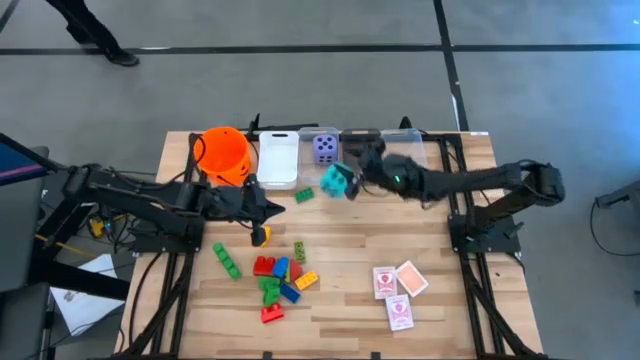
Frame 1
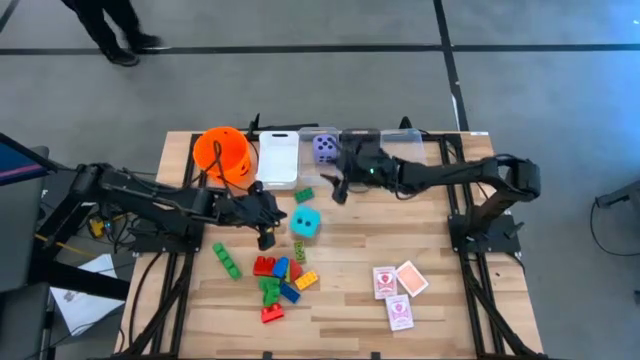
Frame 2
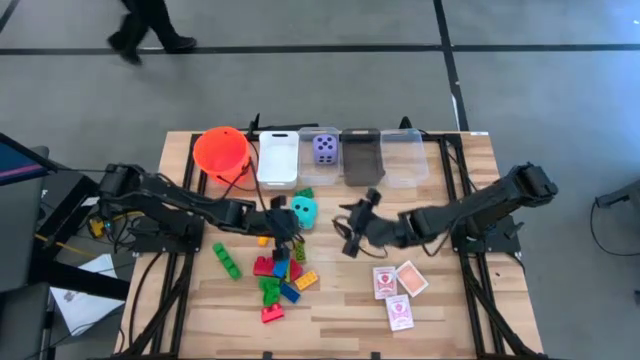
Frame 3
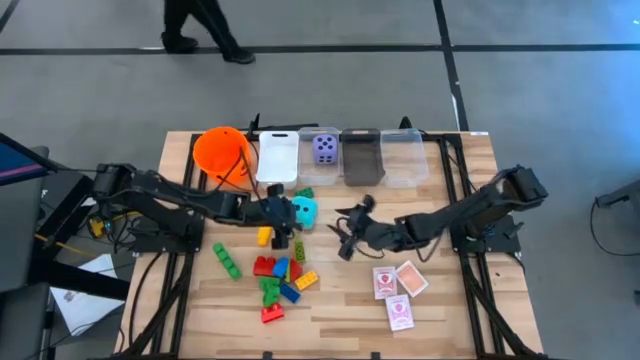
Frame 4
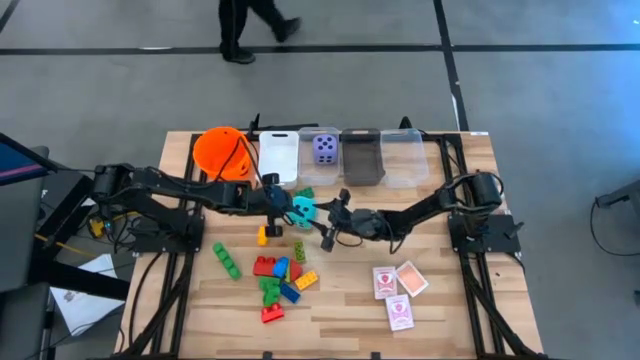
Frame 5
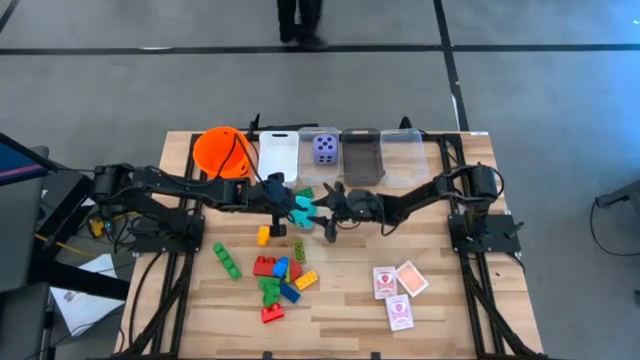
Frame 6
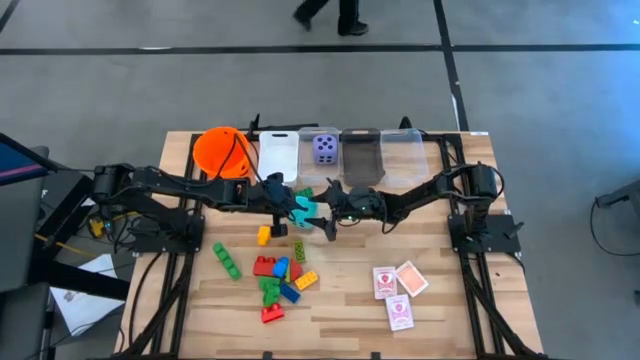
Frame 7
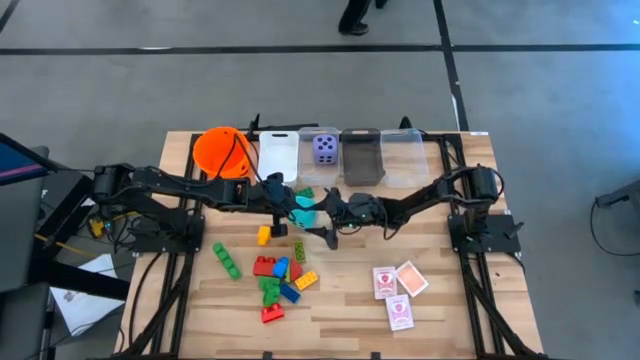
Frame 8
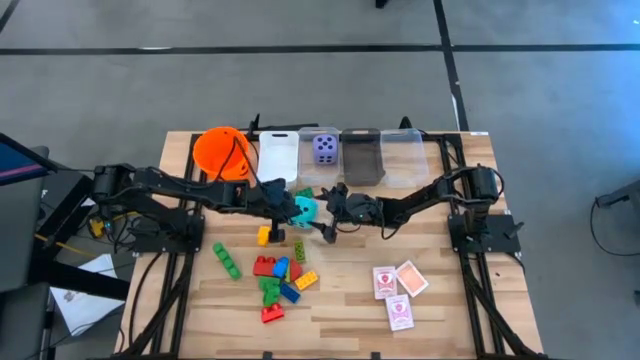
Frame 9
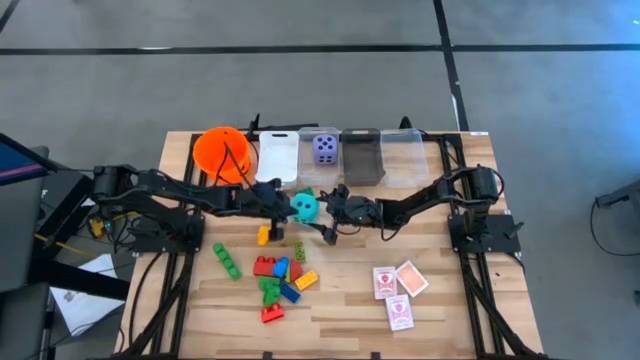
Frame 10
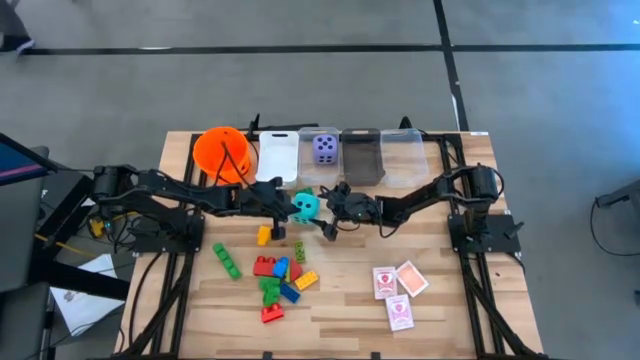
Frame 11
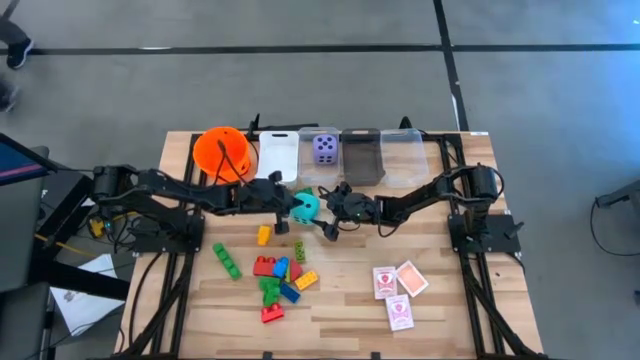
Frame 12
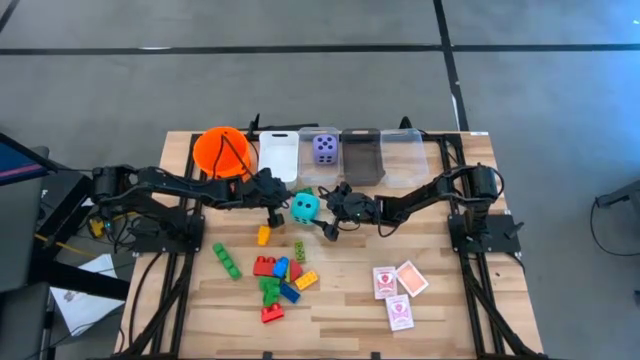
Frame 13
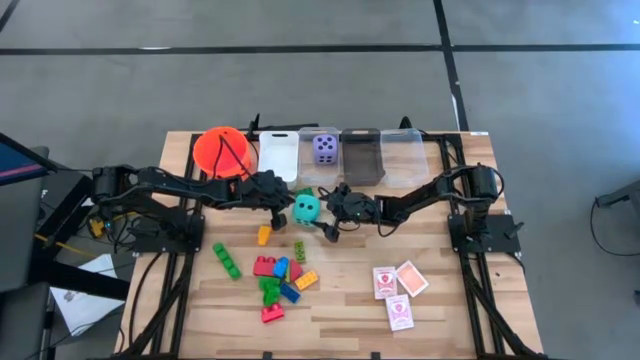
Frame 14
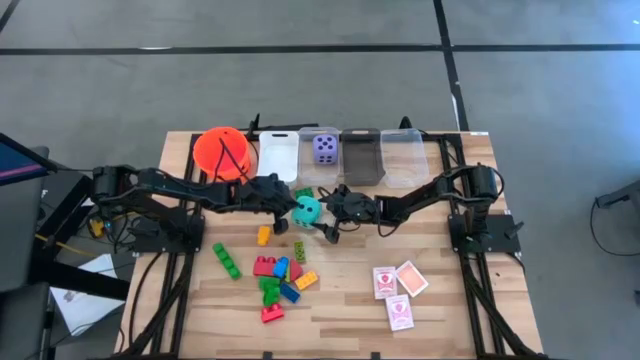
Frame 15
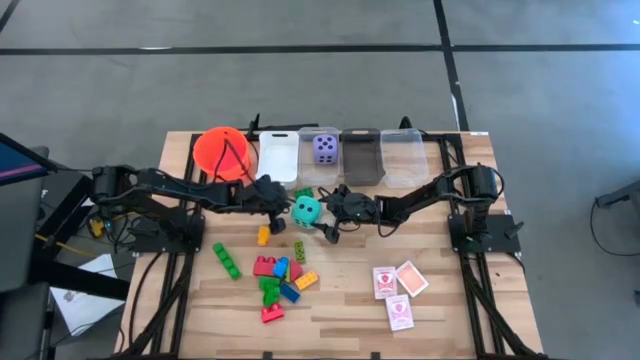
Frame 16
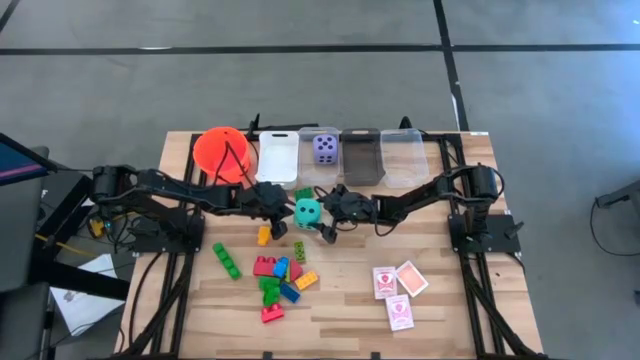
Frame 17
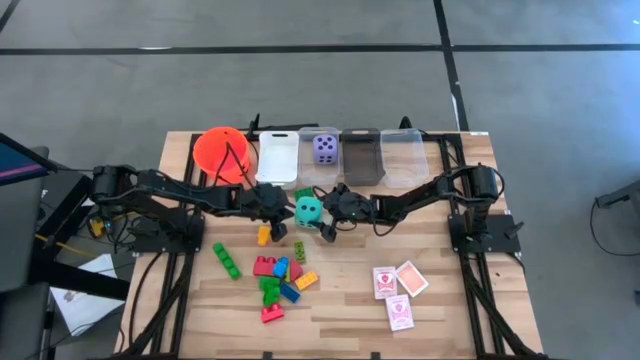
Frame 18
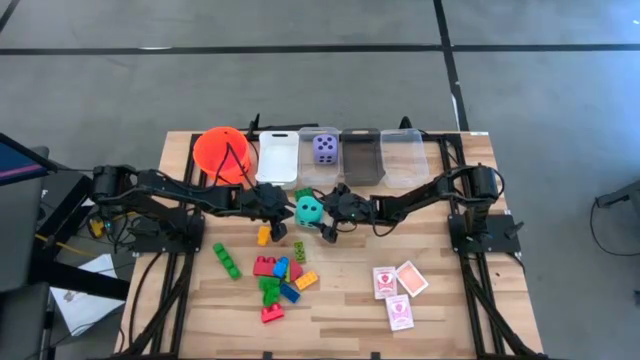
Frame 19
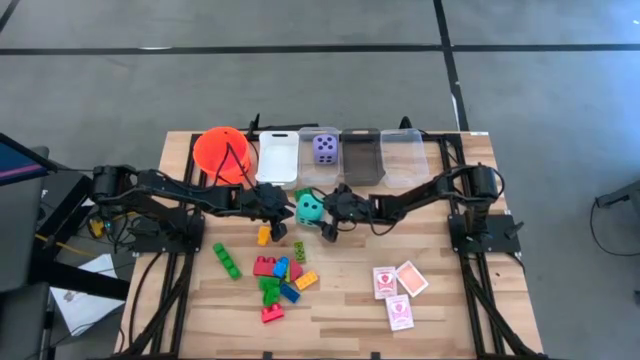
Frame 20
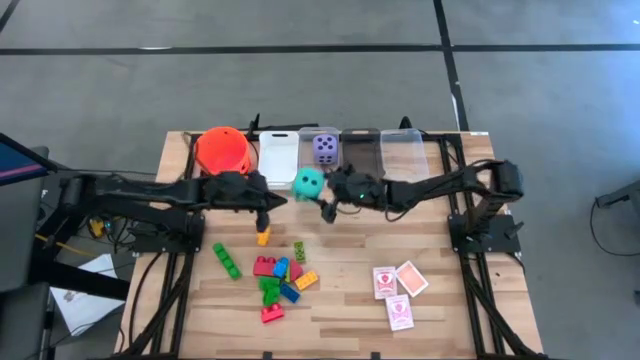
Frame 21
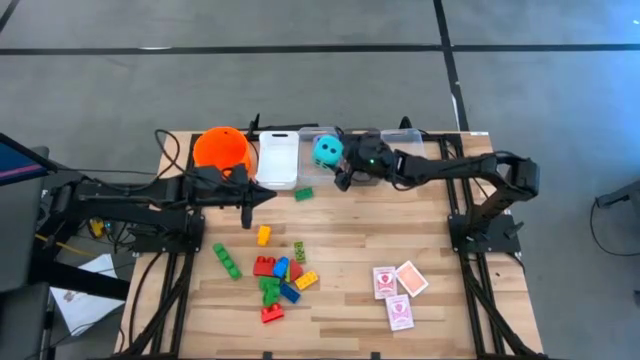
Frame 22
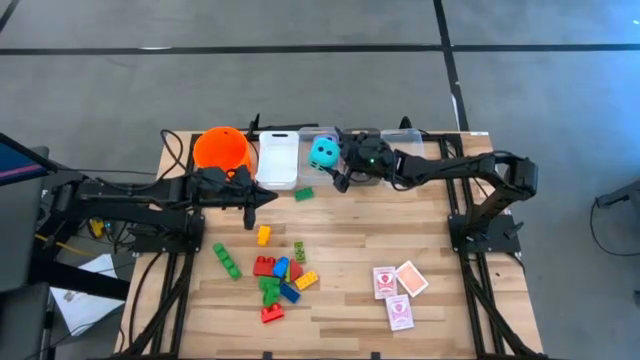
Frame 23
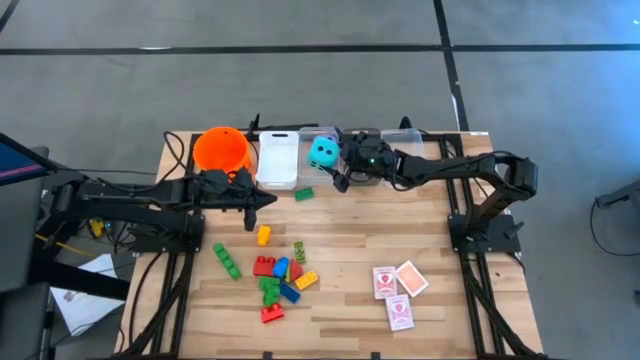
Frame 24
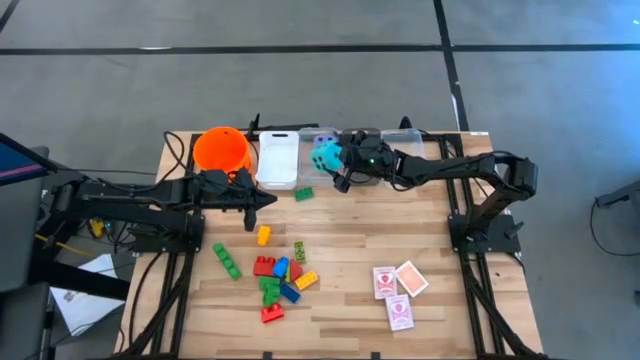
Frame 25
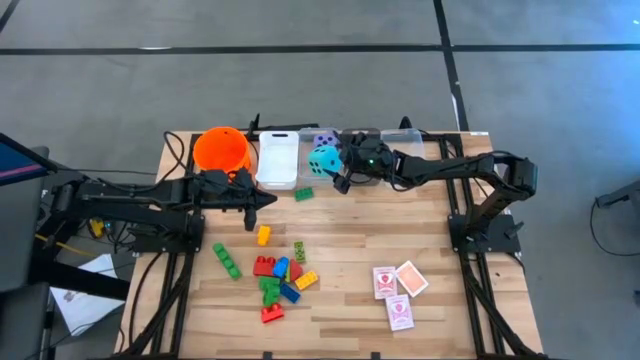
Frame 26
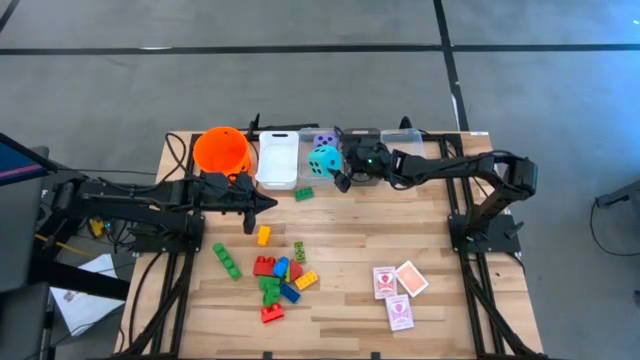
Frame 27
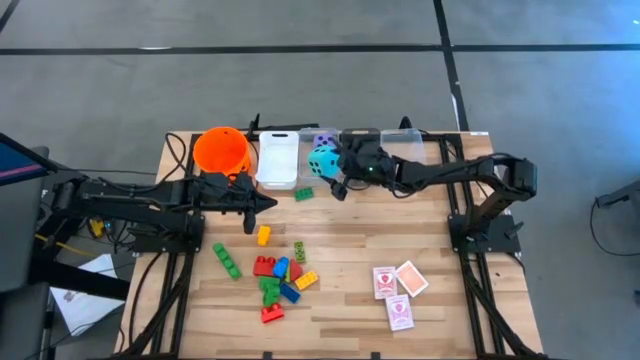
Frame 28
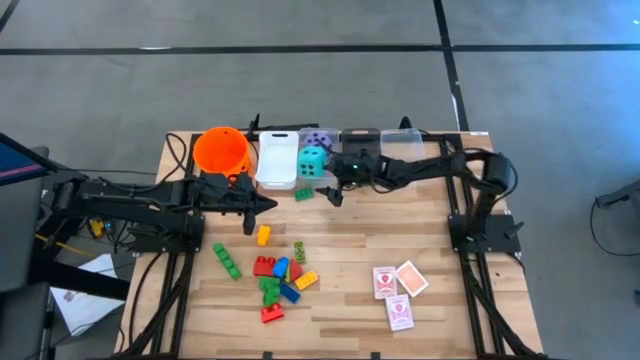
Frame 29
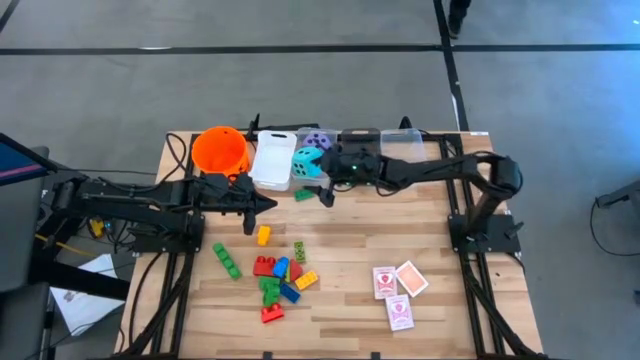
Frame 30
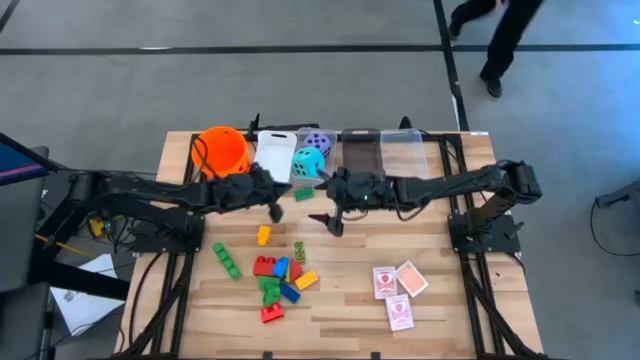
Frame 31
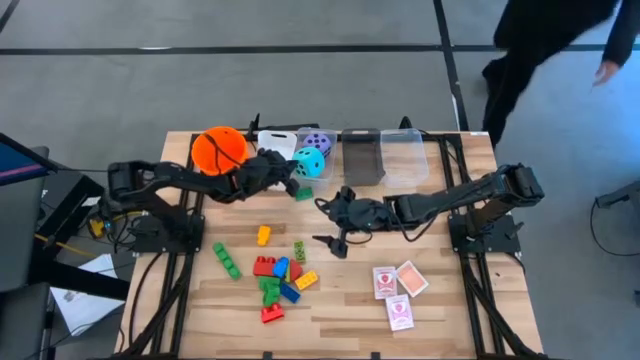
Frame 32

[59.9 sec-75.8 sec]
Task: Pick & Place Toys
Put the blue dice into the left transparent bin

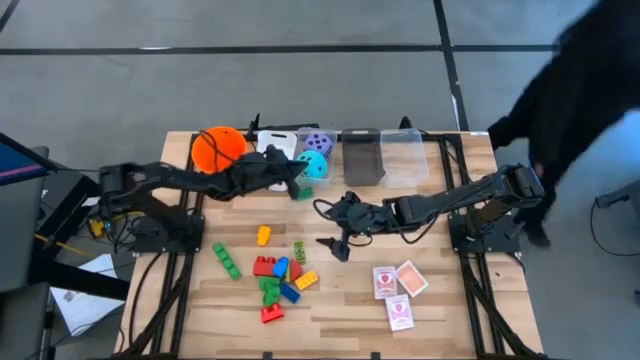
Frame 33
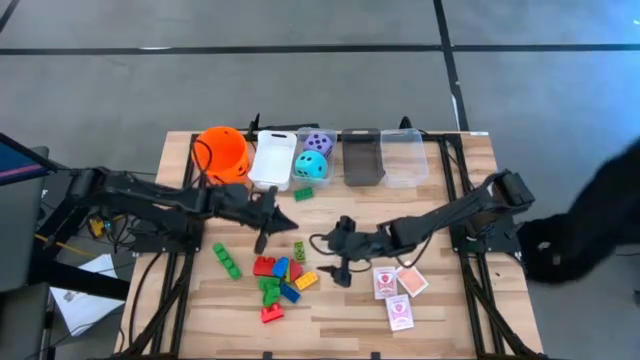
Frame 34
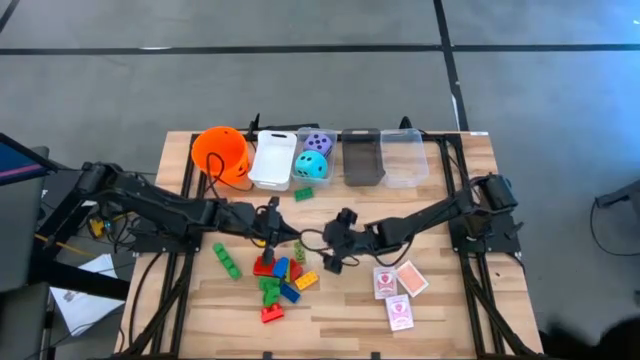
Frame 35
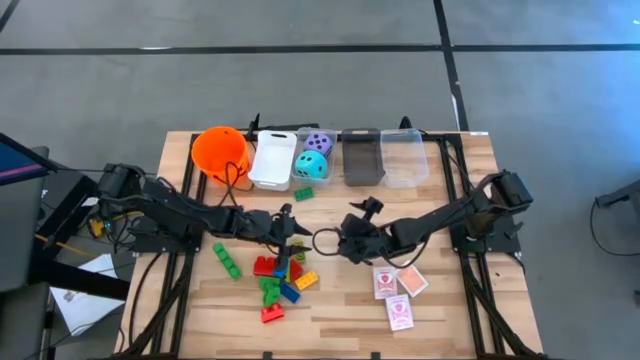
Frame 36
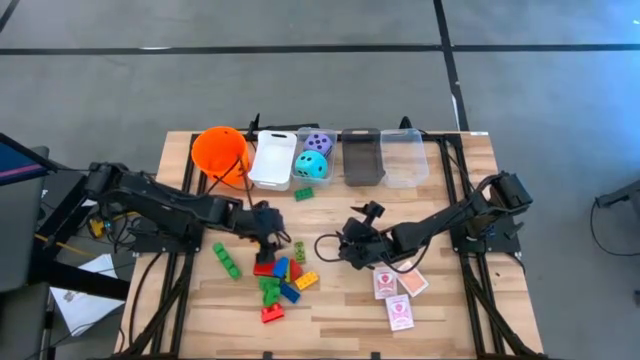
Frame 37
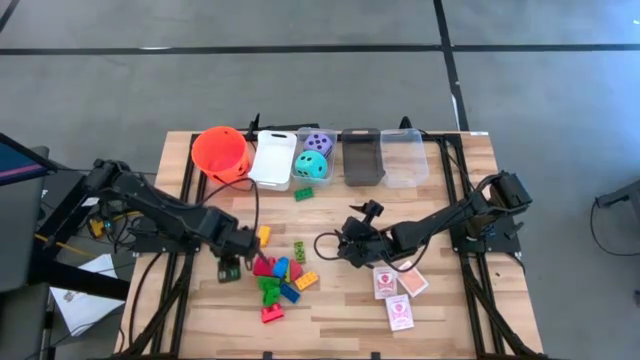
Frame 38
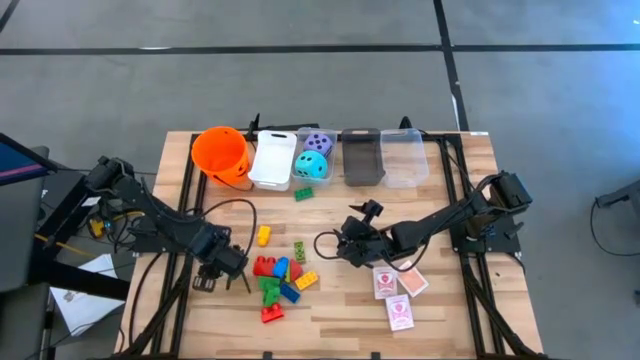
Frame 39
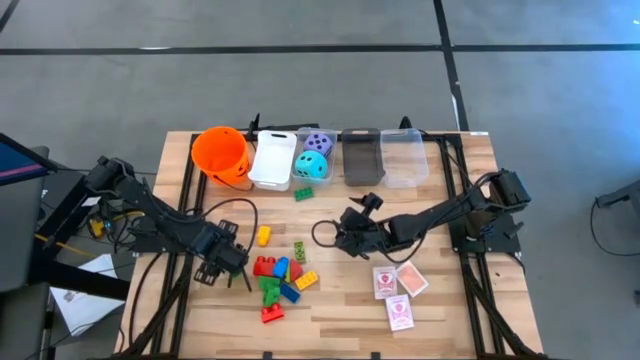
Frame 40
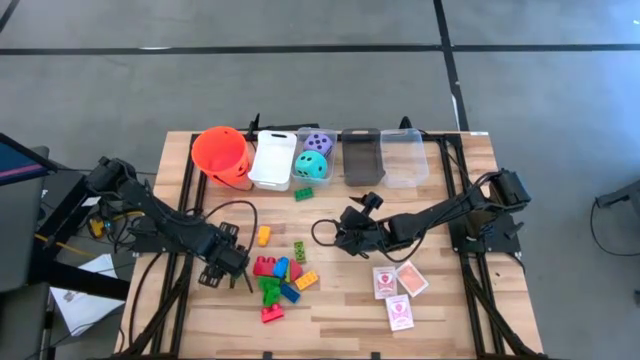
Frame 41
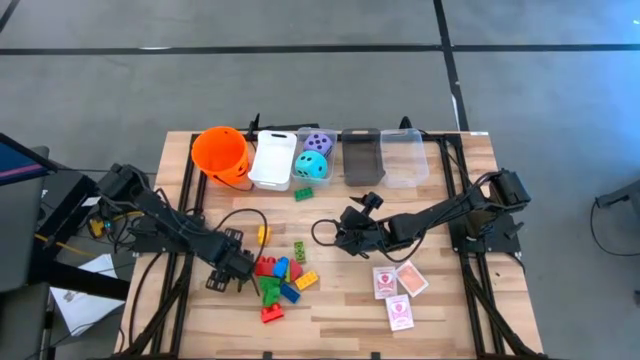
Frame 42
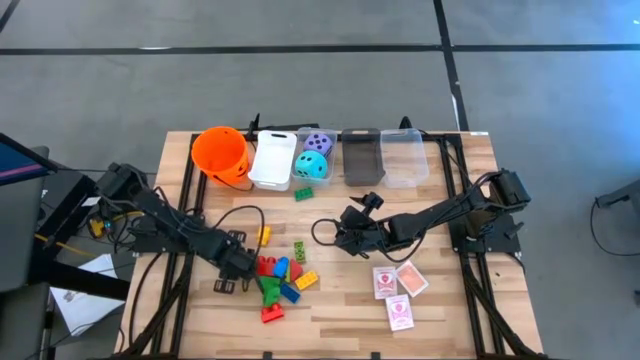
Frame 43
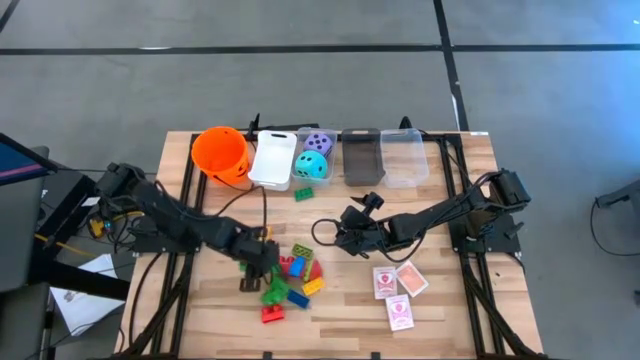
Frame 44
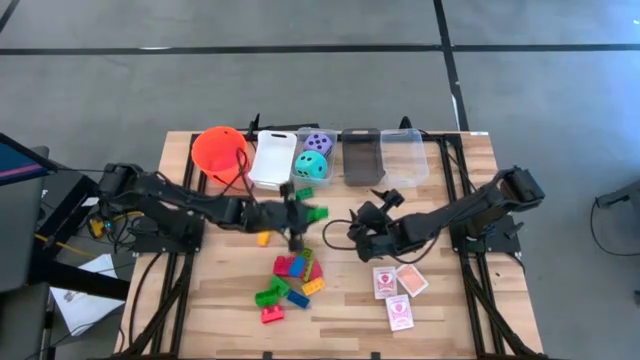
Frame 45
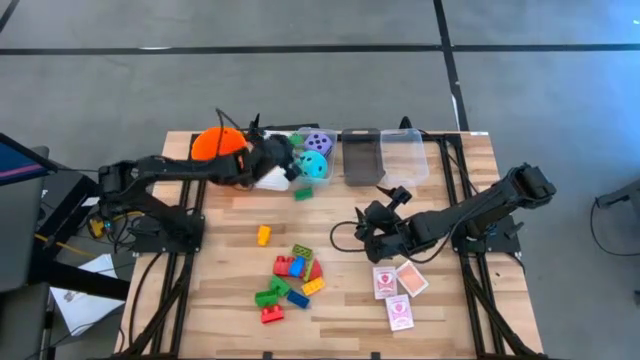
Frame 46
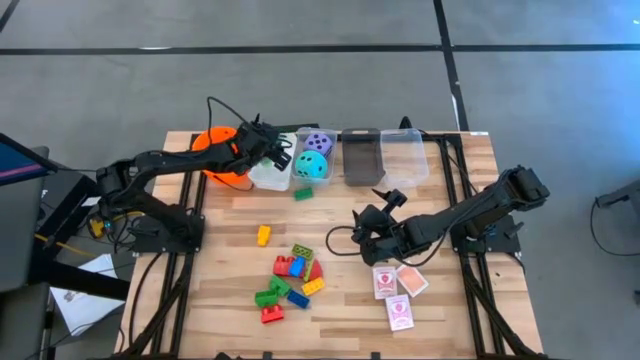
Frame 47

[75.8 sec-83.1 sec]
Put the top left large green game piece into the white bin
